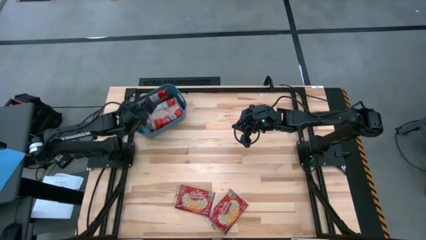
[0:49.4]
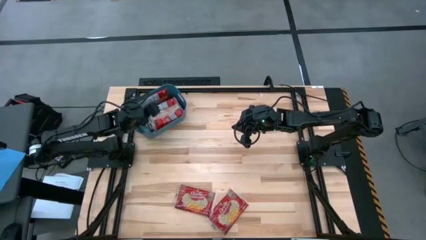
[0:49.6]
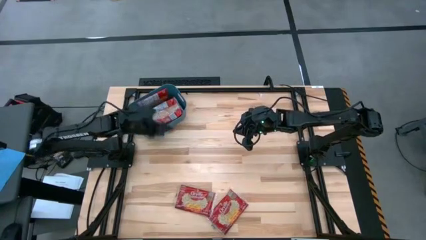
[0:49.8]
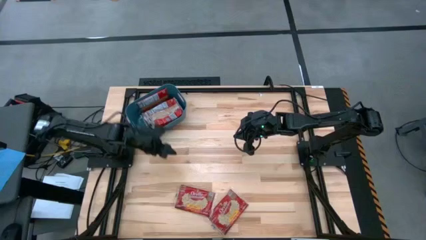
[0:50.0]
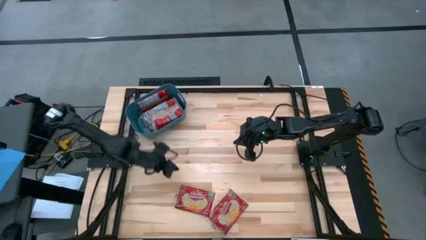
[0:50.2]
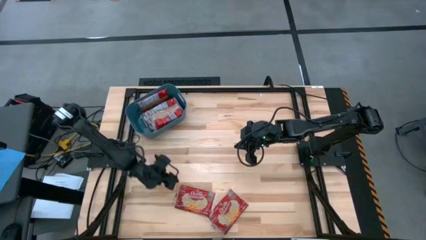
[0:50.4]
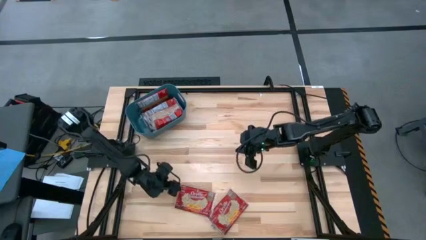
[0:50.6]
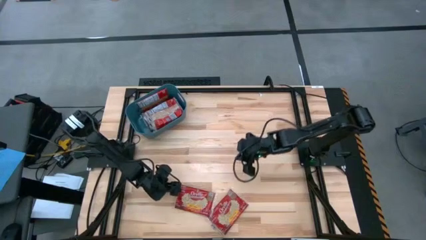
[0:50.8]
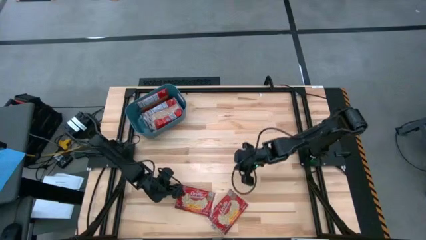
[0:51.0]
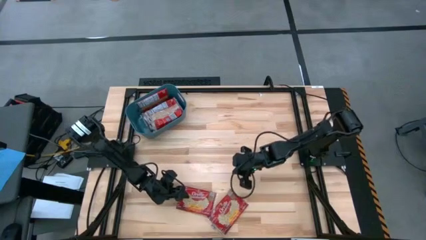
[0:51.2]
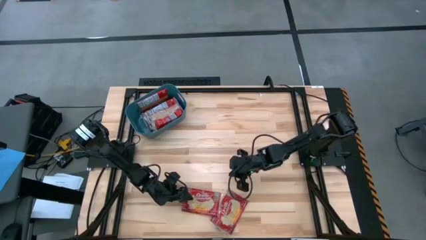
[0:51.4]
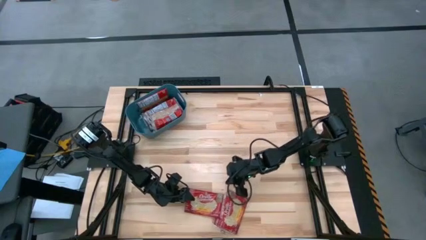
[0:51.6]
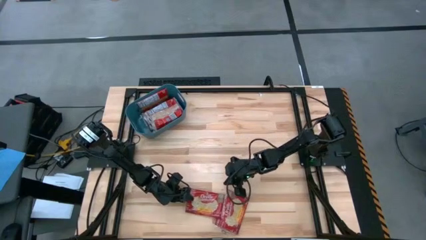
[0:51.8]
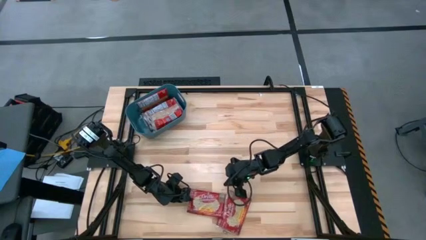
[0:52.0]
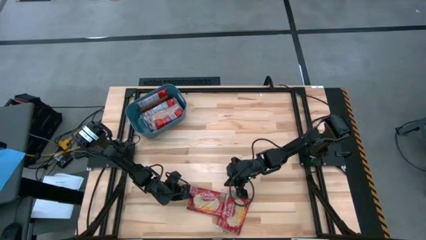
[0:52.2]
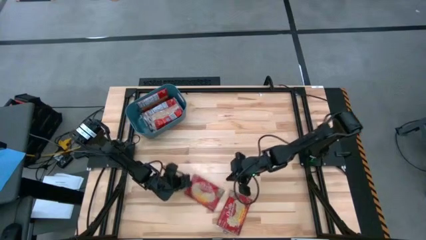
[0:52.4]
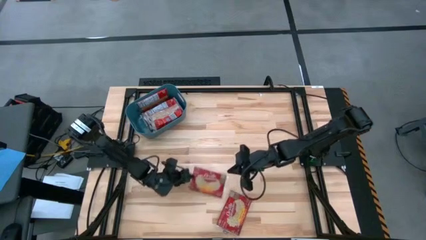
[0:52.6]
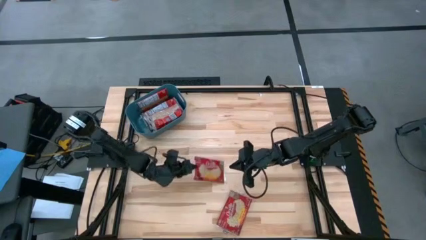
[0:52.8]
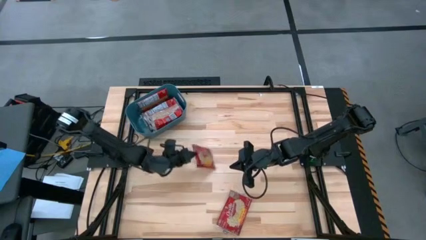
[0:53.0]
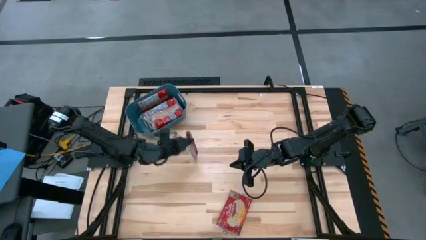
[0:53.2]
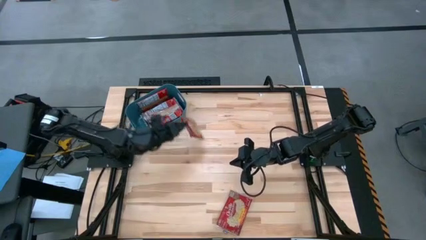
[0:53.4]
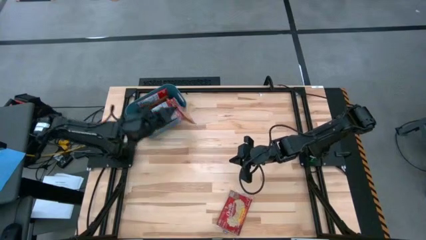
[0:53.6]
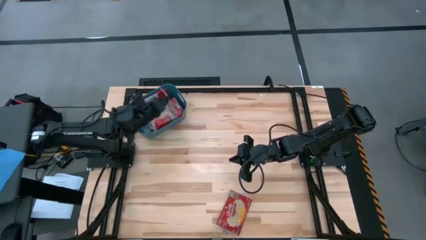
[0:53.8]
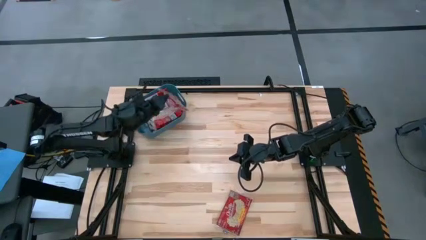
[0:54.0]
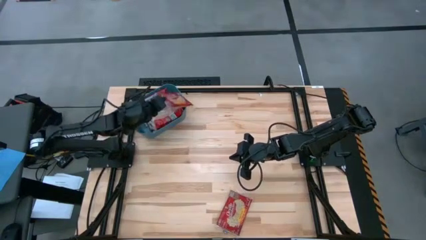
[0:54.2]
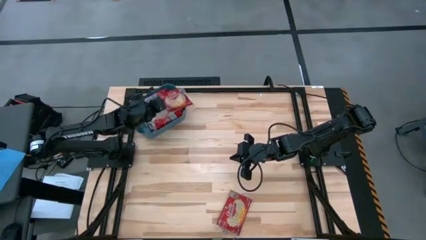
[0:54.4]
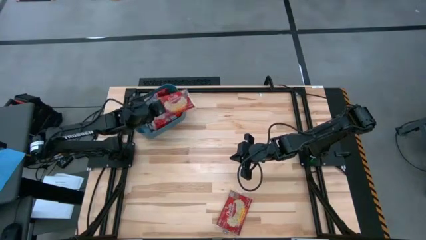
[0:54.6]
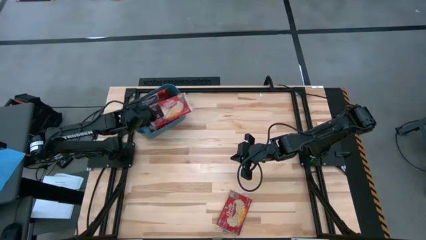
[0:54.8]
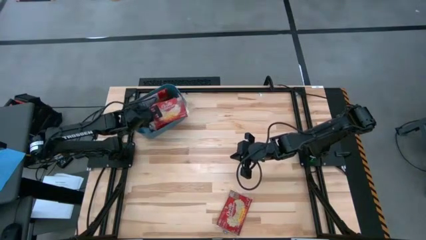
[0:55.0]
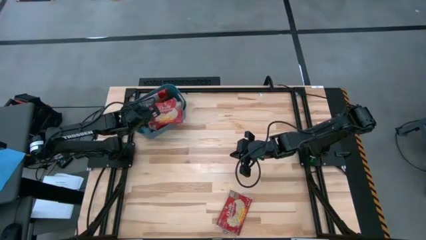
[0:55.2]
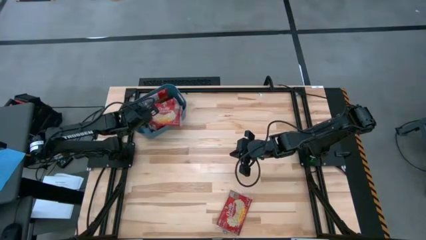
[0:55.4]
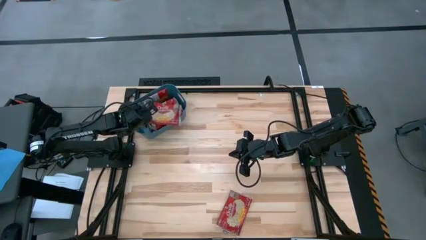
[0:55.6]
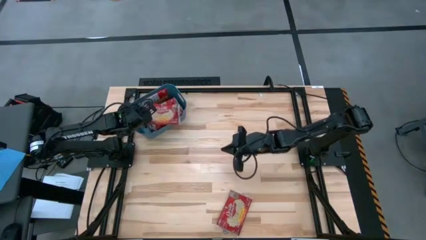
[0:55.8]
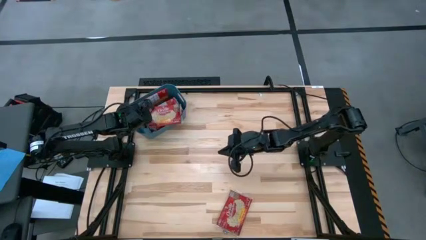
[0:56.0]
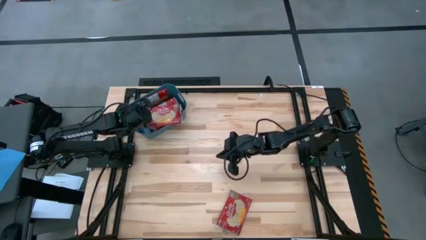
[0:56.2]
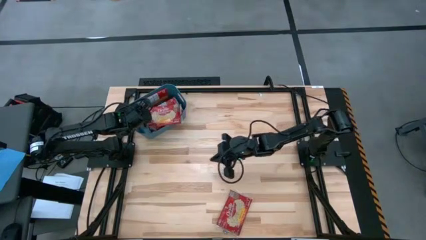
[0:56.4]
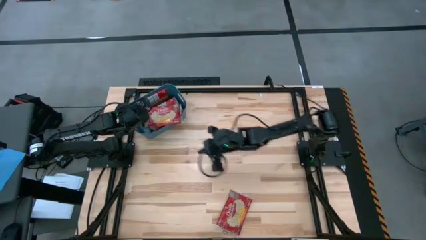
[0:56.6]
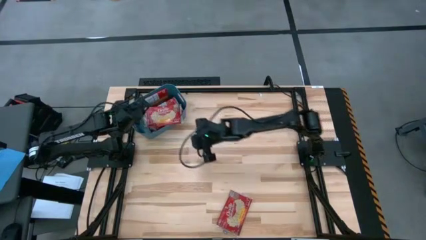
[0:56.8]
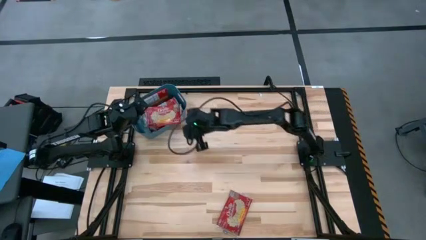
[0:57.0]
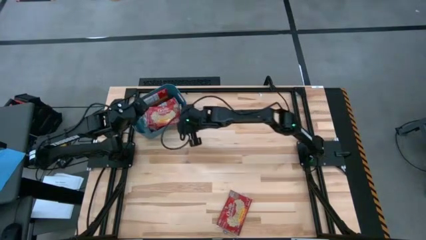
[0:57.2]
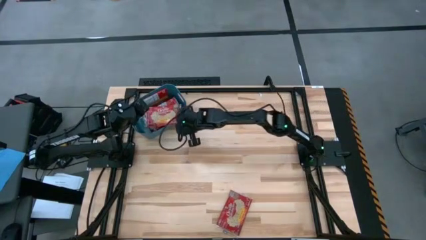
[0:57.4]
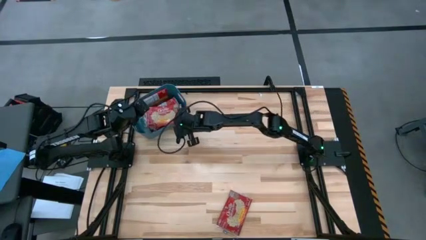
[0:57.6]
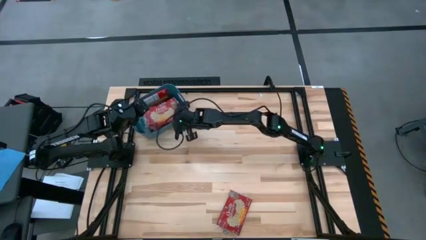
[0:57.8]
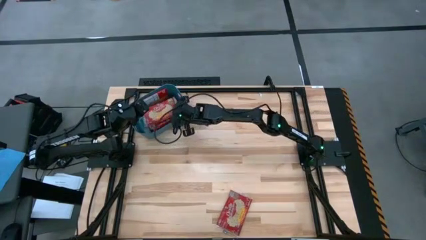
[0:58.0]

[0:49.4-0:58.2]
Task: Sort popcorn bags into baskets
Put the popcorn bag into the green bin

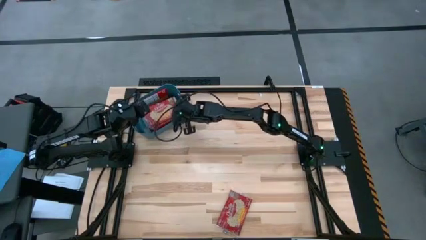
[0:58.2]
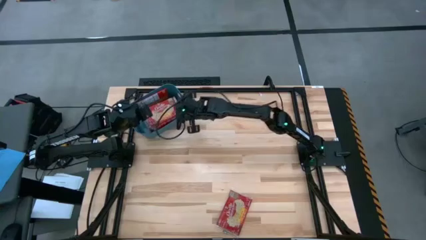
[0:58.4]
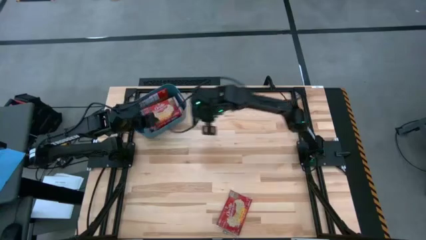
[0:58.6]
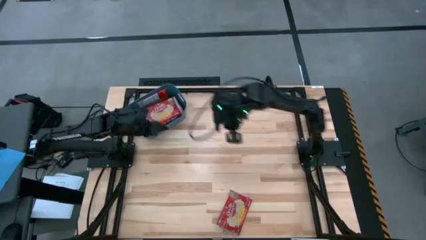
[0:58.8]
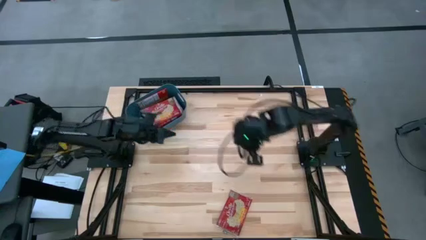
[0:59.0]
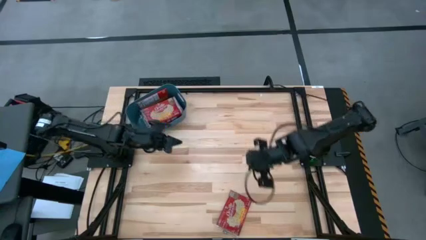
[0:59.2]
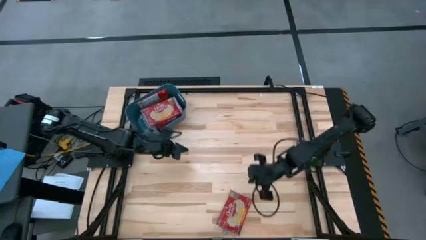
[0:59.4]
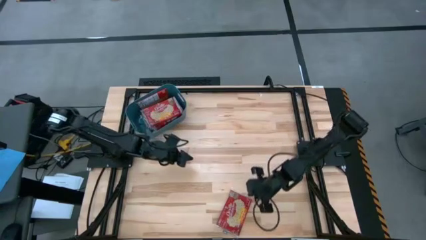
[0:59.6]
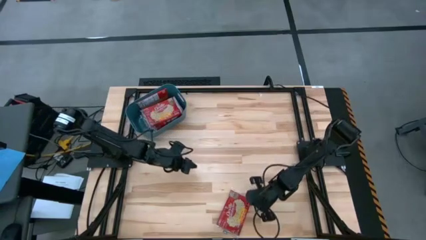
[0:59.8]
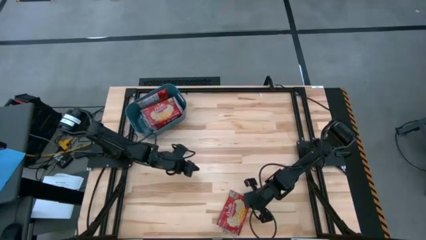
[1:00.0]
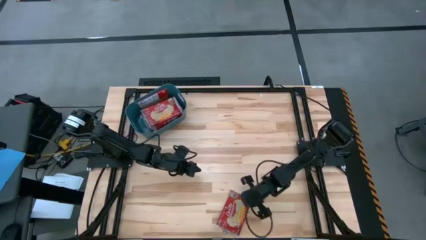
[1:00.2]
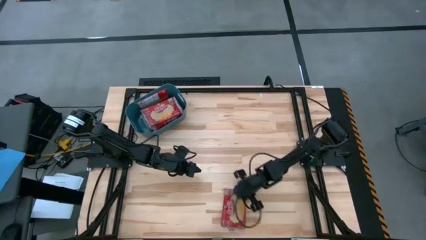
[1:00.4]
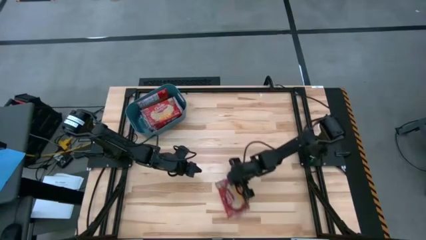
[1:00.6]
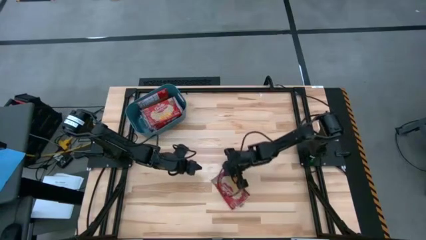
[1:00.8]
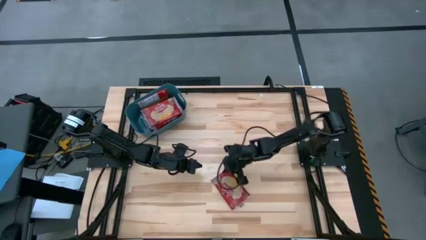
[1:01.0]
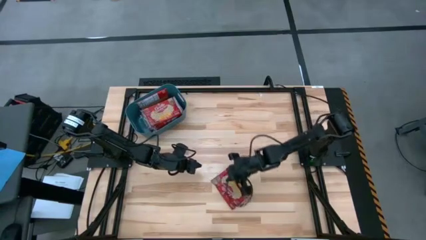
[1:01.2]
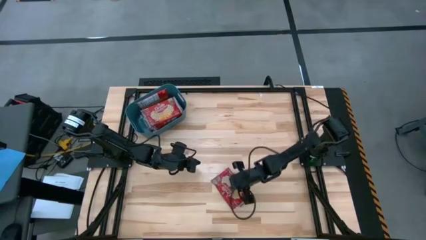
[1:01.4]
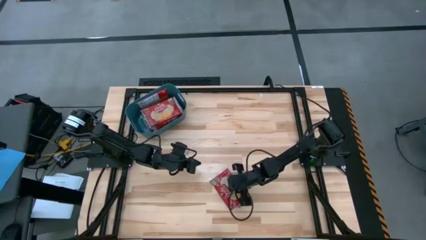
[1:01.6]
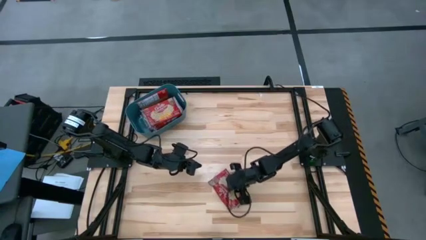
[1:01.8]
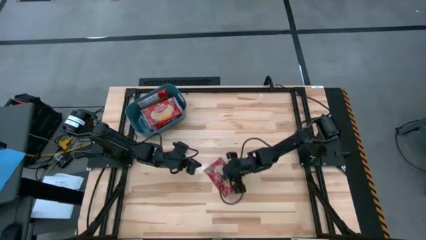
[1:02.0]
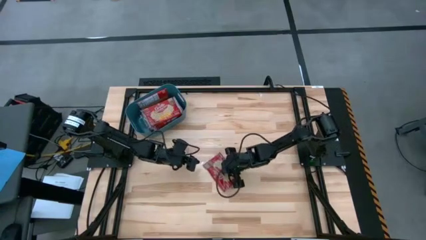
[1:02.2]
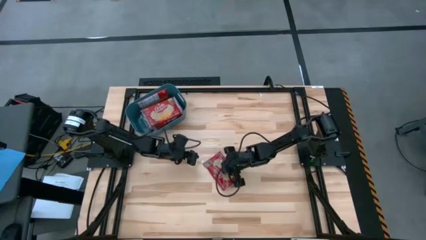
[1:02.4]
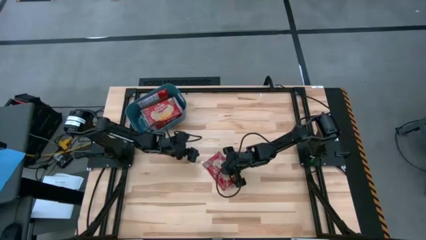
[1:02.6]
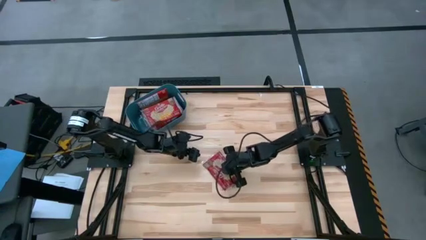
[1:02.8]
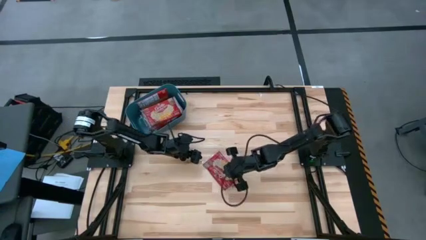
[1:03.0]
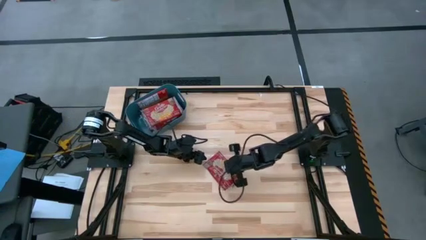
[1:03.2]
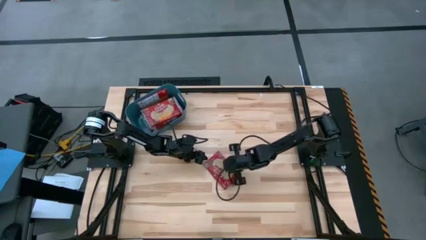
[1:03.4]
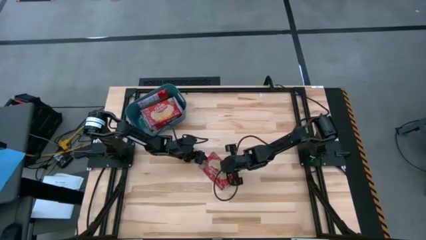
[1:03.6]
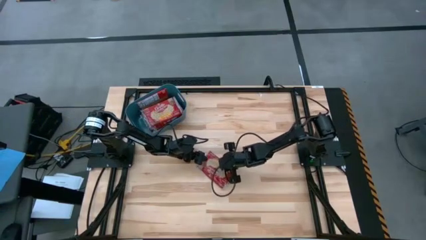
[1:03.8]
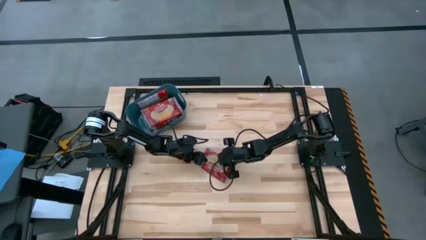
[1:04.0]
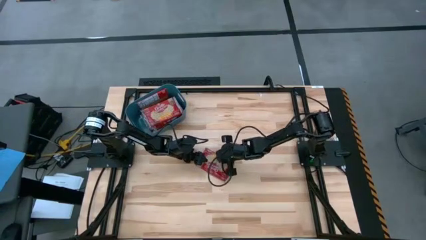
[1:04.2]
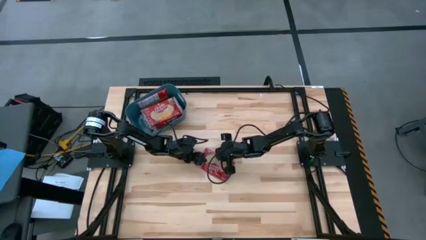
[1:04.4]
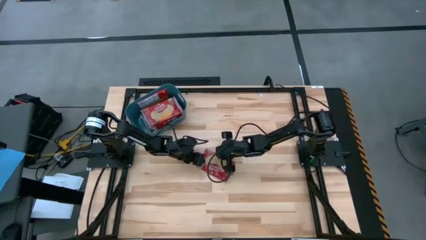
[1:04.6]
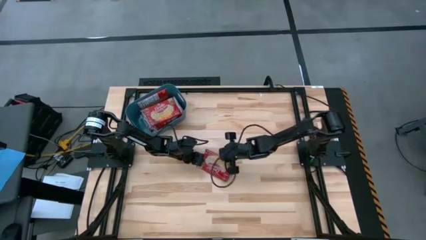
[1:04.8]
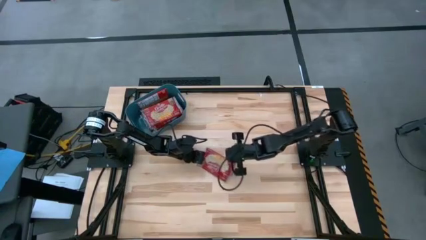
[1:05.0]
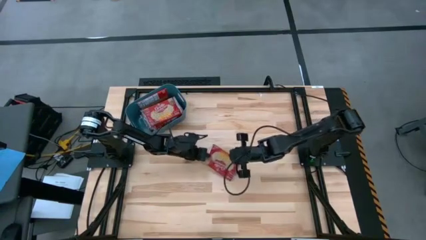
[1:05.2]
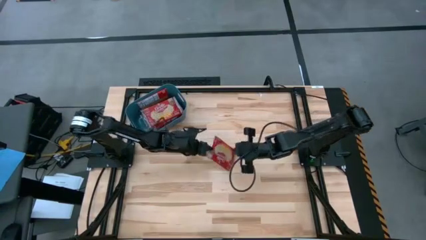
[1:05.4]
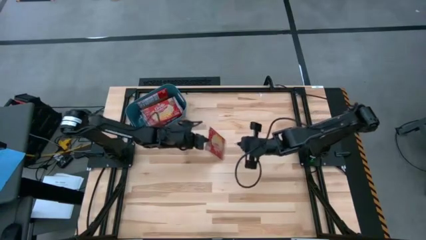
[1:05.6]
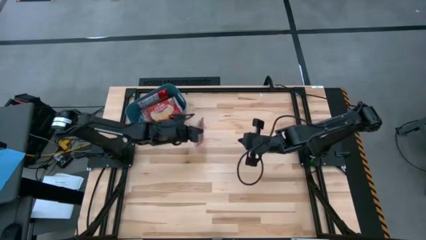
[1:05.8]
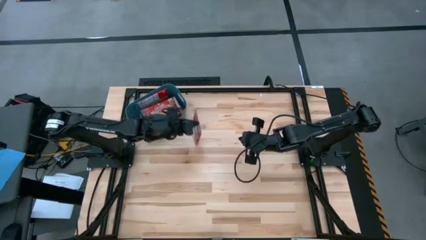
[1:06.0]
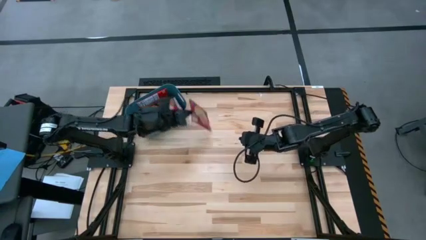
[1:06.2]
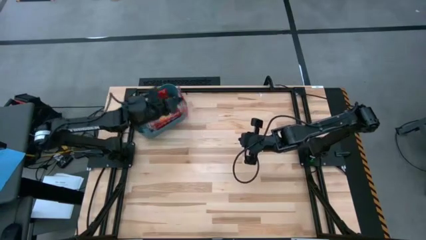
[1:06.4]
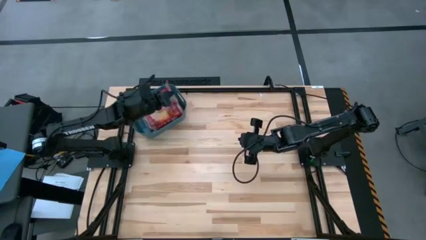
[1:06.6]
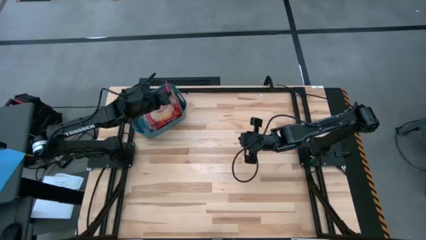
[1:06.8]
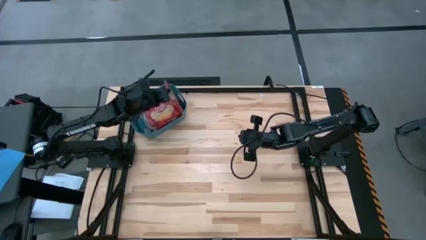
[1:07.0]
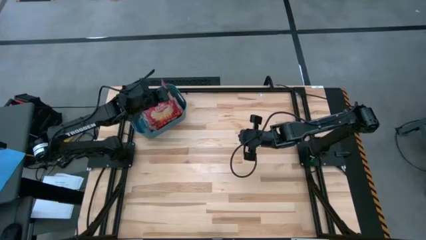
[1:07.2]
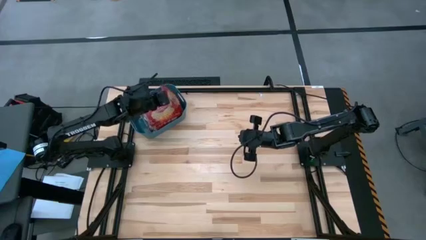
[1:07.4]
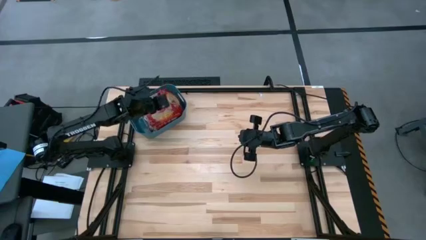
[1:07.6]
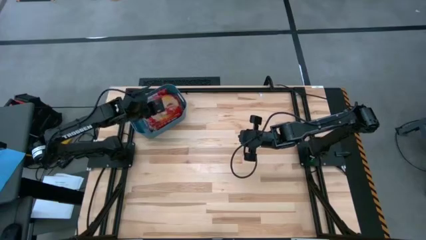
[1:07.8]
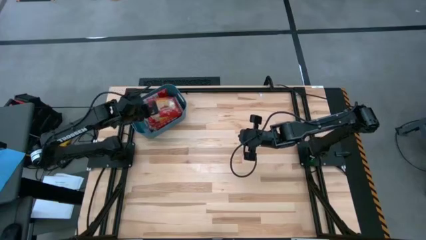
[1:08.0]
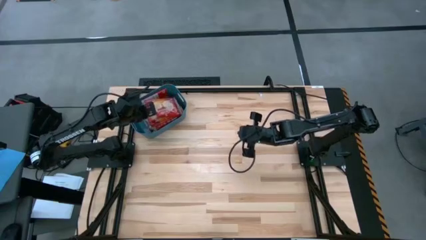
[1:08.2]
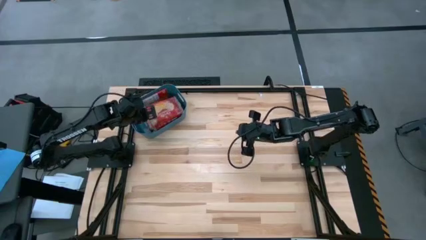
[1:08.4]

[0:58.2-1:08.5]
Put the popcorn bag into the green bin
